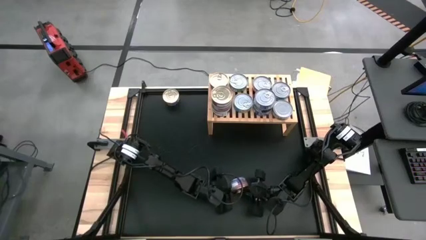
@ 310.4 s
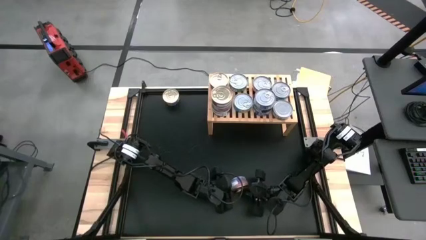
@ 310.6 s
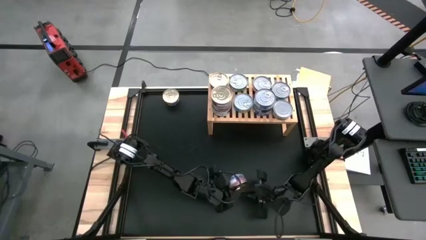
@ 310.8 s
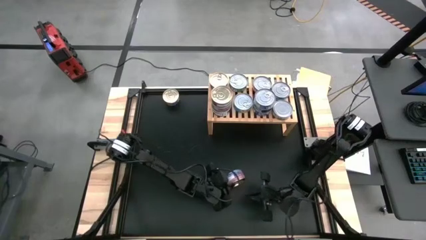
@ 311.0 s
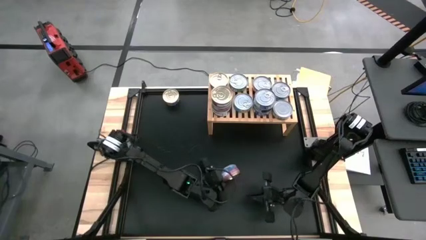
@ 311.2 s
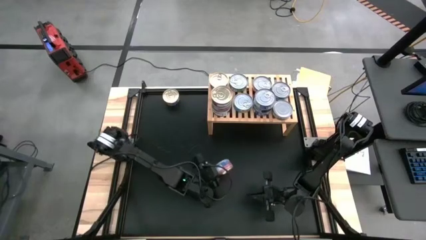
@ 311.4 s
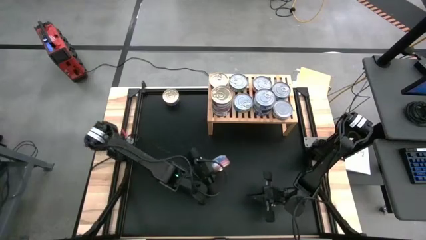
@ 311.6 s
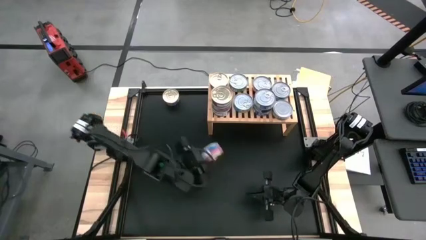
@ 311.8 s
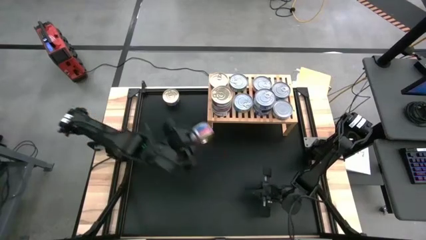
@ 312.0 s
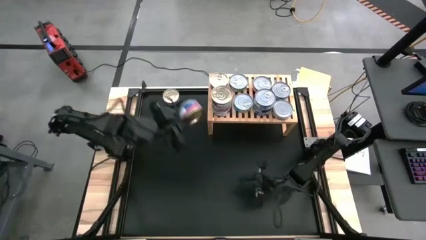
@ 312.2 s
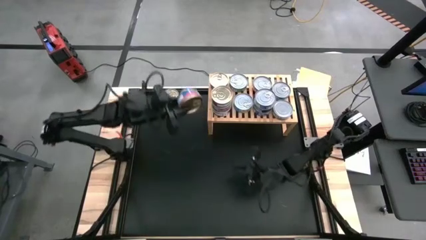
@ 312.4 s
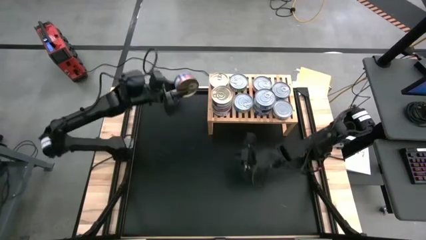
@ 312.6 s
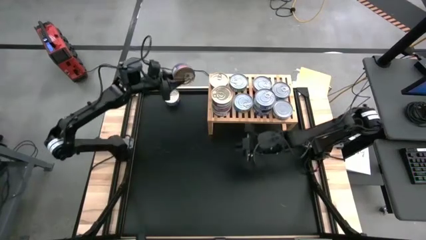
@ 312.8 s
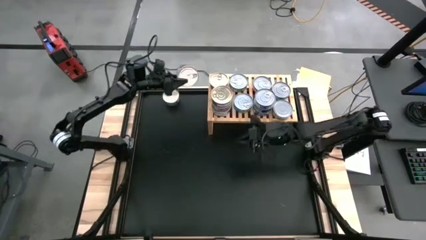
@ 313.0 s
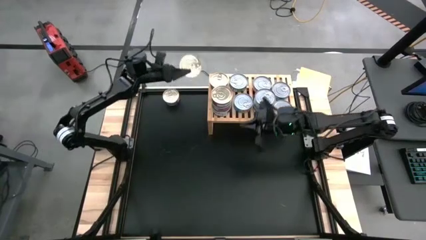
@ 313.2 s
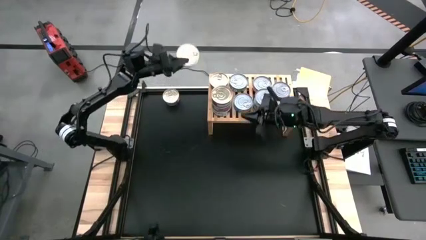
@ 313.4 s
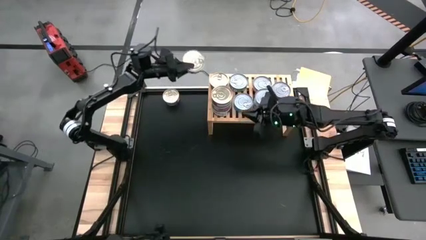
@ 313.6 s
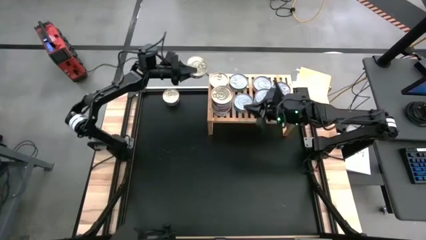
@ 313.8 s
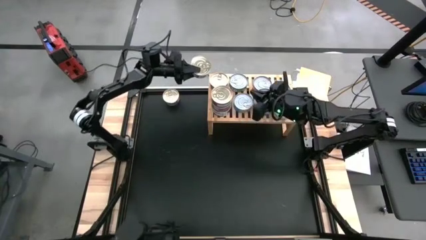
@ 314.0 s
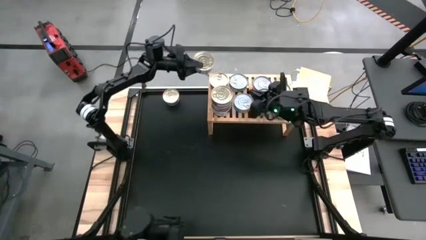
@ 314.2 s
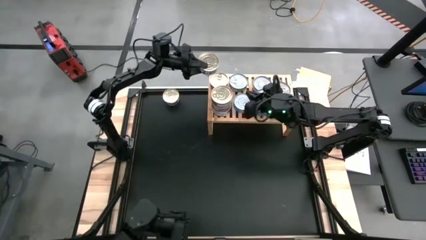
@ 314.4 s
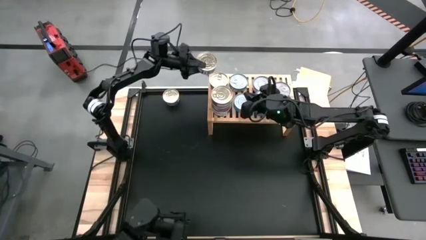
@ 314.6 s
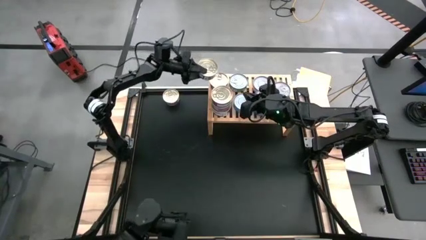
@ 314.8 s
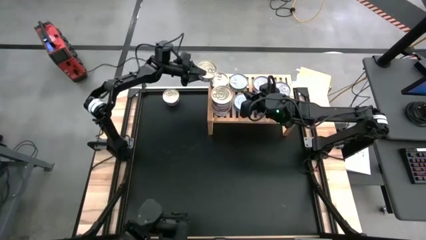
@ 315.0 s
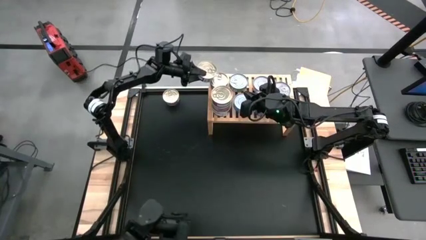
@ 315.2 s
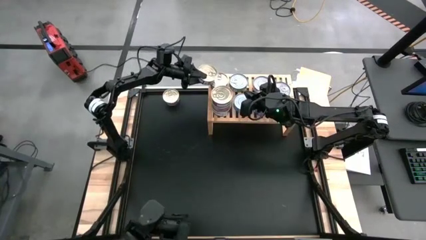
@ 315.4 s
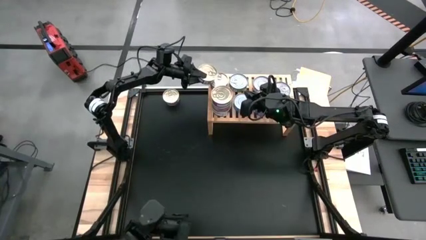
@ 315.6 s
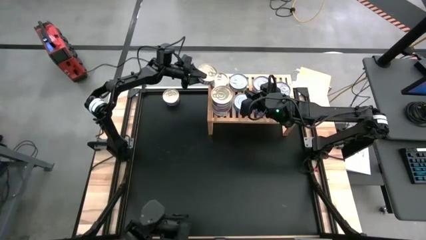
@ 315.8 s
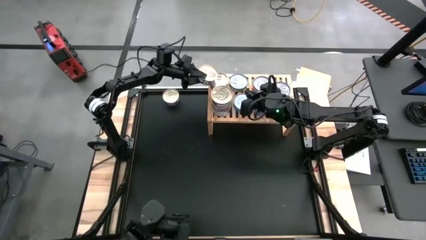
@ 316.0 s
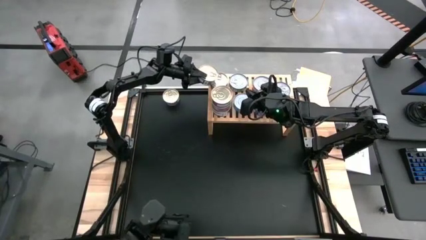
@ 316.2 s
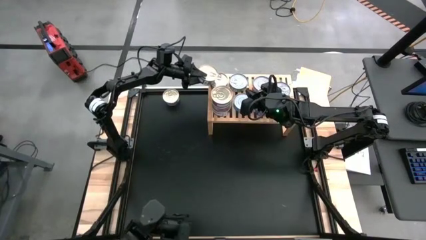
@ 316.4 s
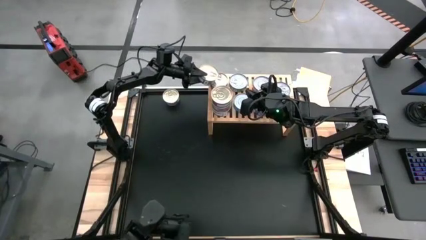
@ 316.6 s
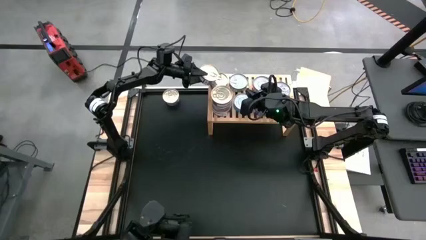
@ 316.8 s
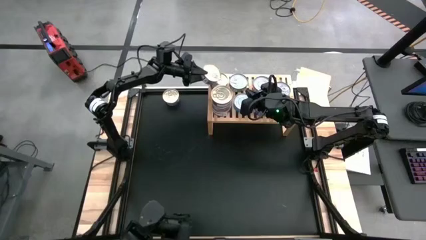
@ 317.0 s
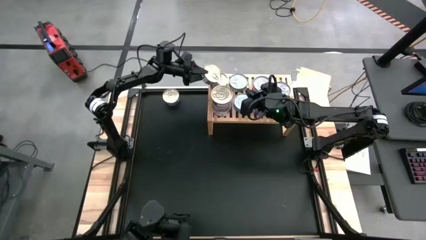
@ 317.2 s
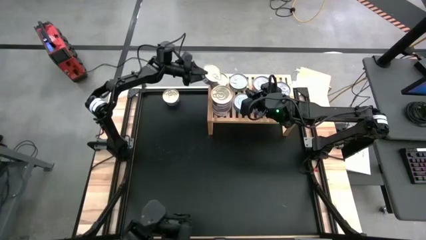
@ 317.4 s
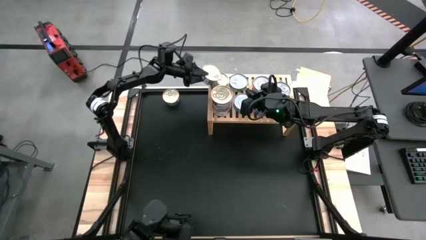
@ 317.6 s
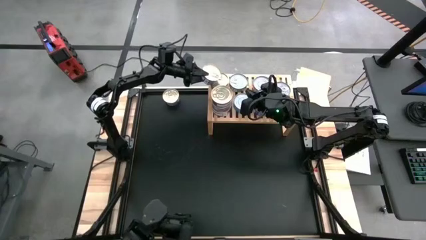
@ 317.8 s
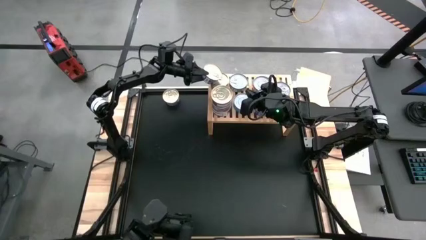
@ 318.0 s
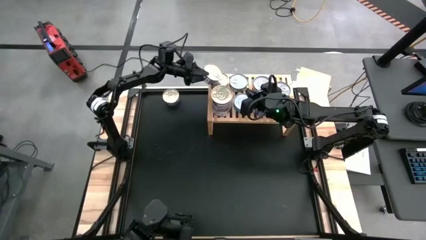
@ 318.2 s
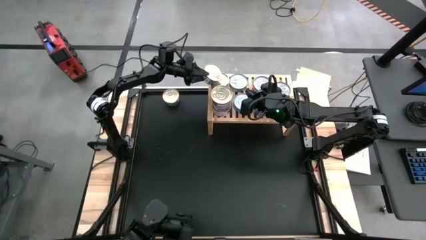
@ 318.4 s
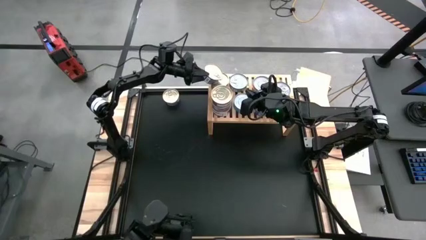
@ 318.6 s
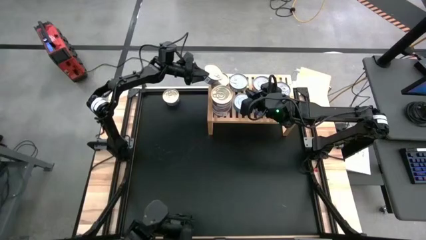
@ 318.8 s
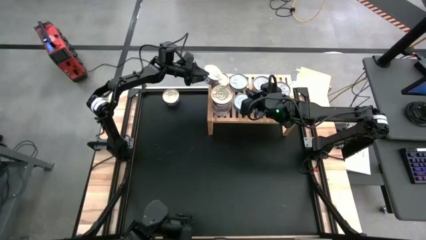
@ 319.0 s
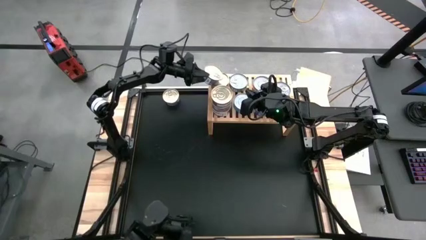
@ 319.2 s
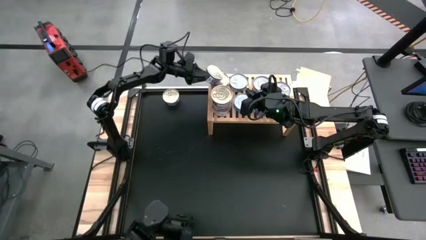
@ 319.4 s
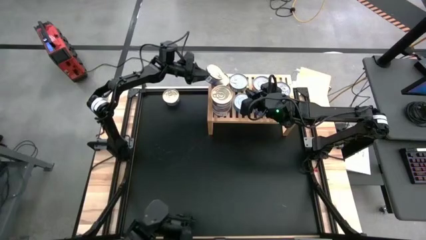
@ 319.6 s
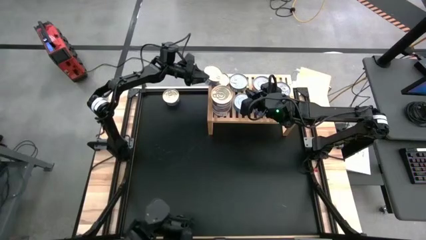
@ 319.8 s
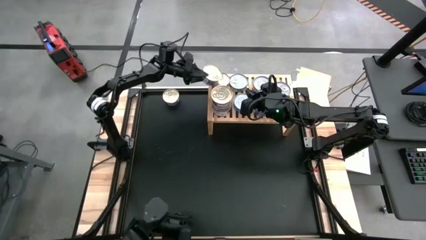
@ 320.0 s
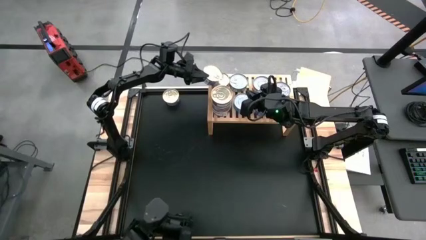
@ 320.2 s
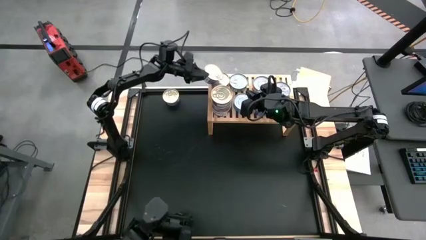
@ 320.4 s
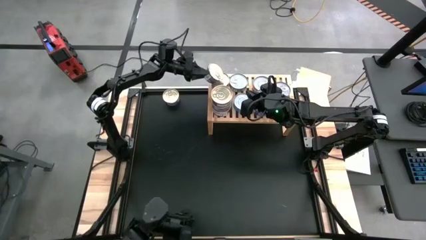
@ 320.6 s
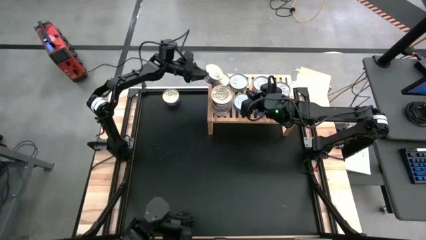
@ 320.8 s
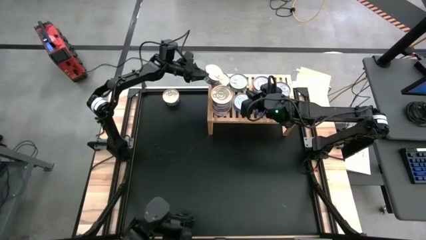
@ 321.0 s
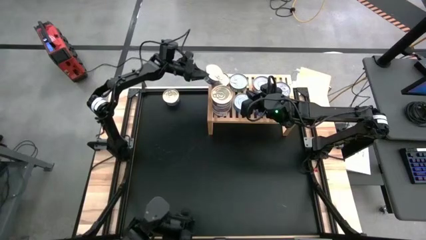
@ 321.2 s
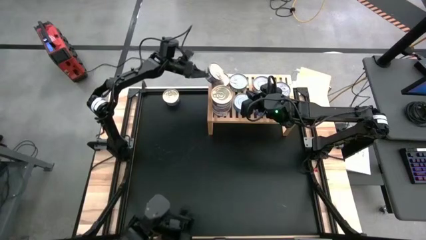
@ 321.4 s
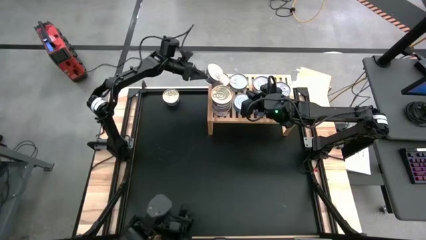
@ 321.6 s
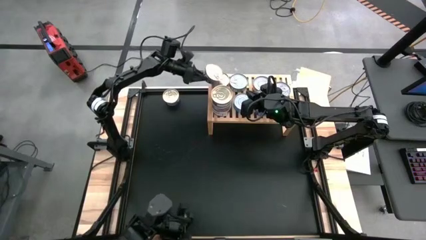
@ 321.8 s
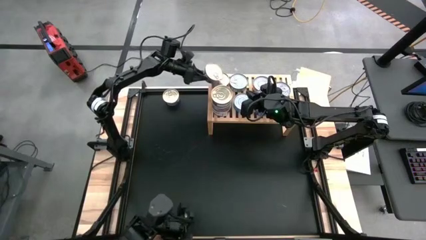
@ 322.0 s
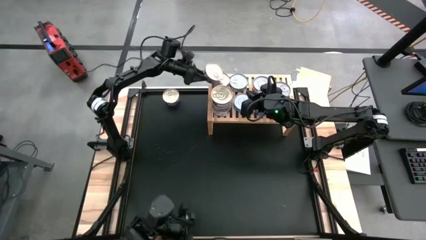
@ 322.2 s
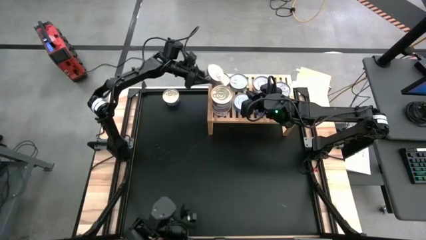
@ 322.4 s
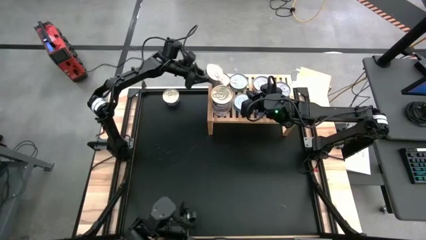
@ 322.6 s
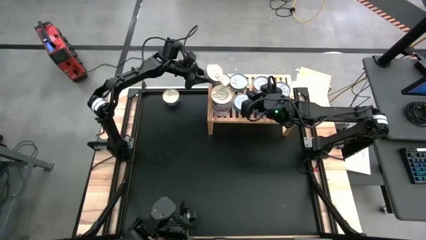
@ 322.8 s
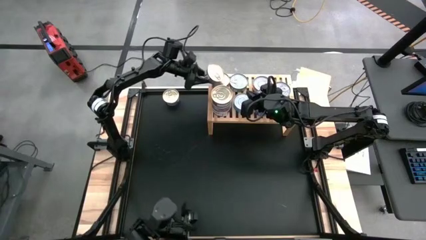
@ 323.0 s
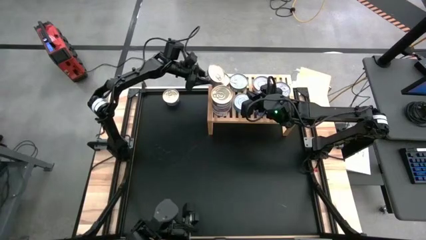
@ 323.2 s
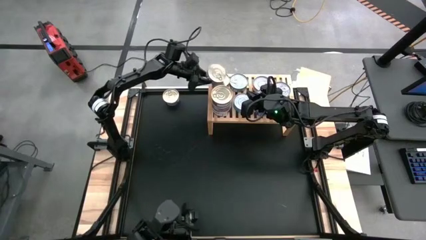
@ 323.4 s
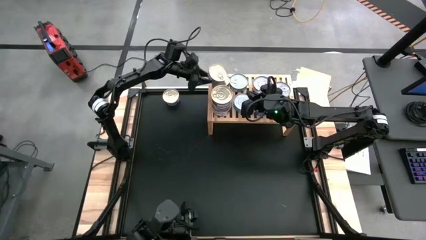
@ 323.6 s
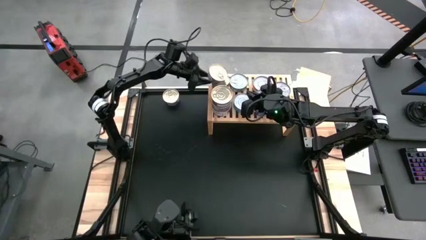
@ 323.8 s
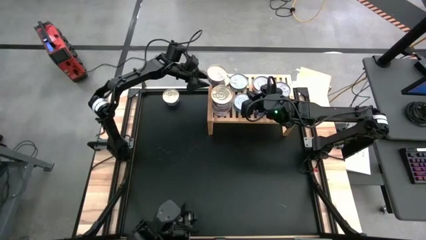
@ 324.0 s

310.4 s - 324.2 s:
Task: Stack canned seafood by type on shelf
Stack the blue-pink tuna can on top of the blue-pink tuna can on the shelf
